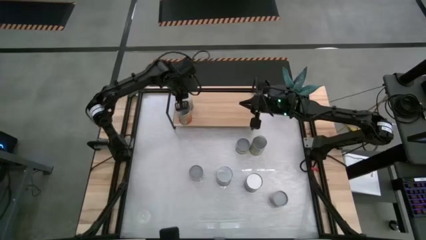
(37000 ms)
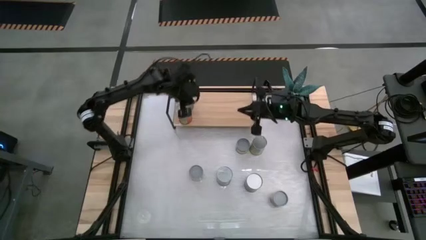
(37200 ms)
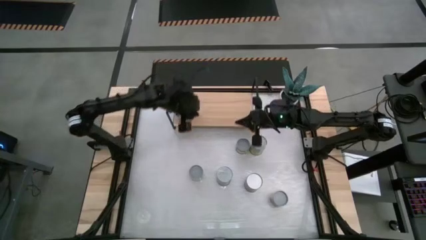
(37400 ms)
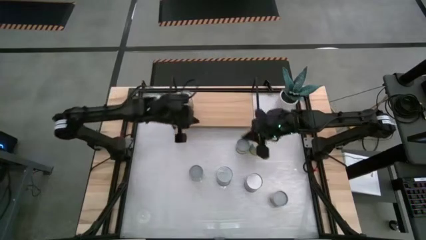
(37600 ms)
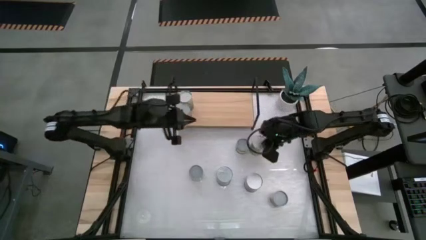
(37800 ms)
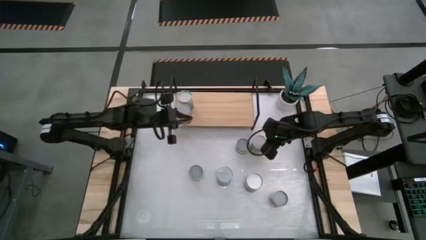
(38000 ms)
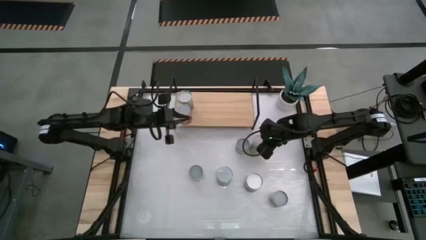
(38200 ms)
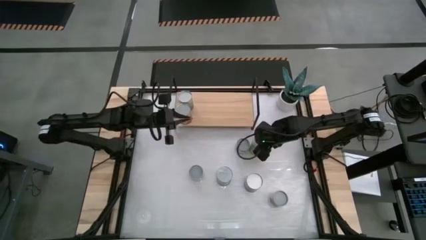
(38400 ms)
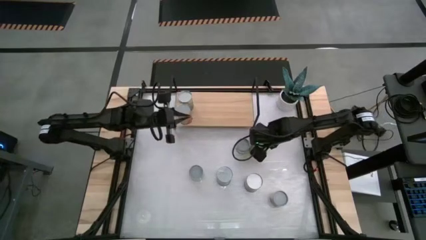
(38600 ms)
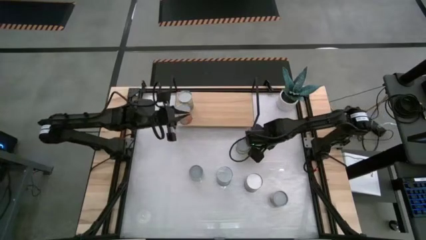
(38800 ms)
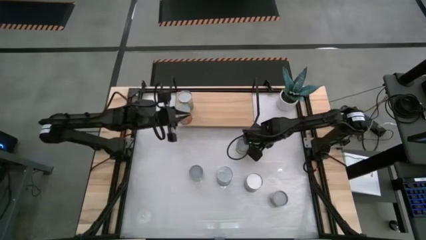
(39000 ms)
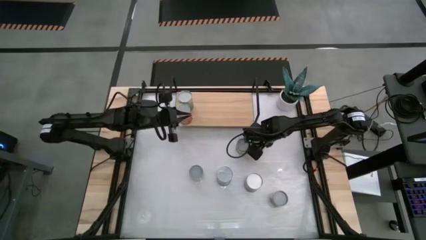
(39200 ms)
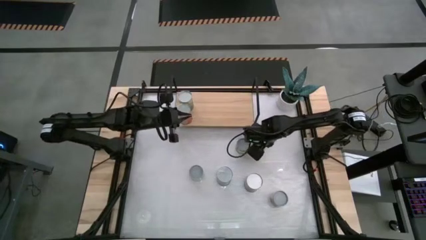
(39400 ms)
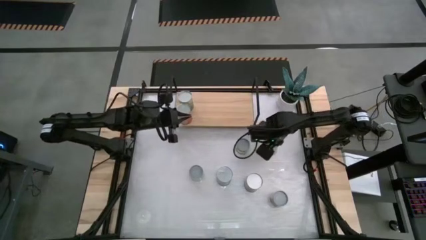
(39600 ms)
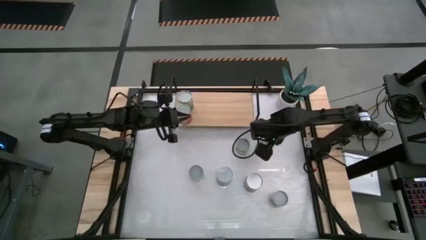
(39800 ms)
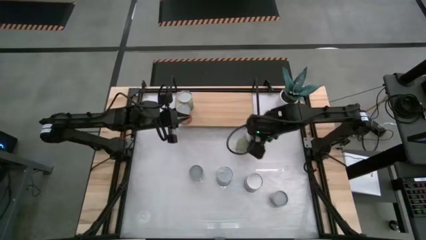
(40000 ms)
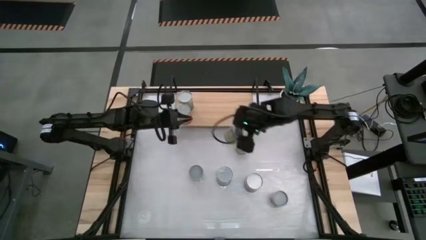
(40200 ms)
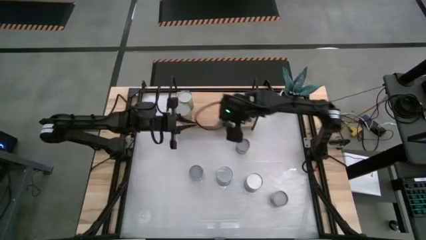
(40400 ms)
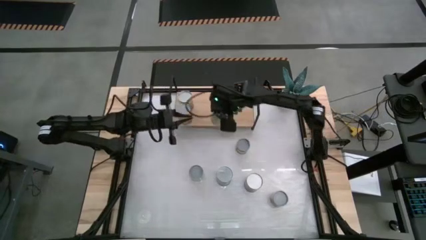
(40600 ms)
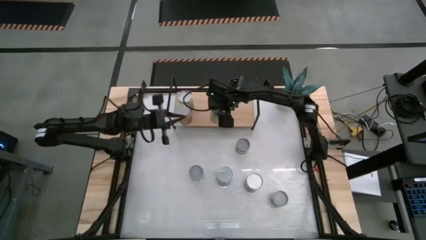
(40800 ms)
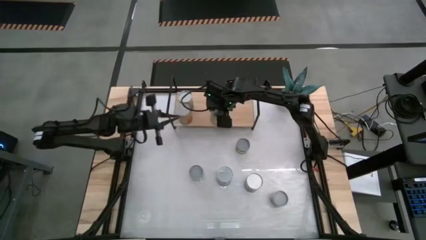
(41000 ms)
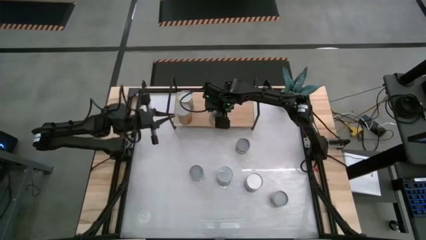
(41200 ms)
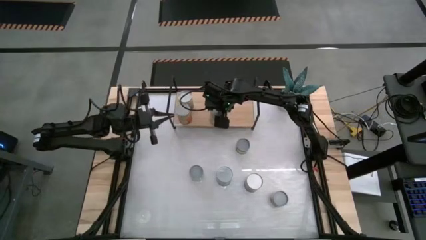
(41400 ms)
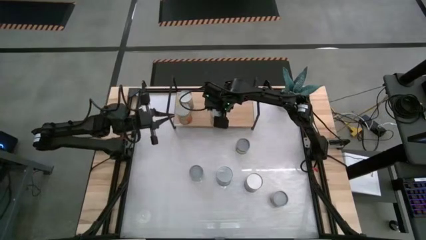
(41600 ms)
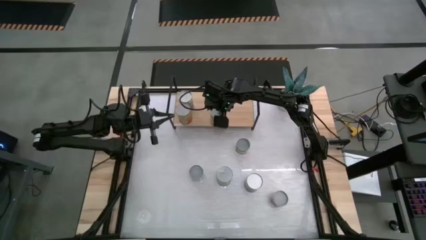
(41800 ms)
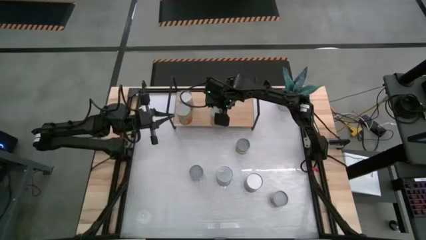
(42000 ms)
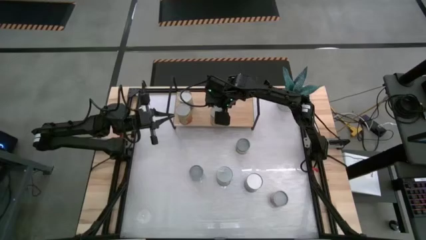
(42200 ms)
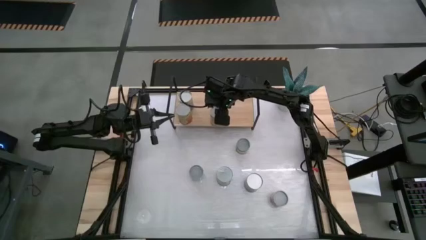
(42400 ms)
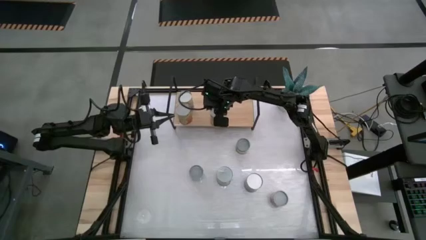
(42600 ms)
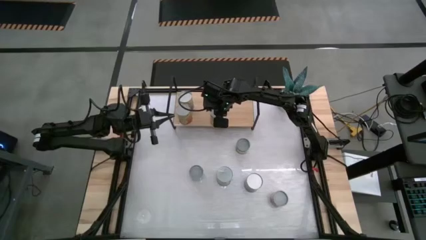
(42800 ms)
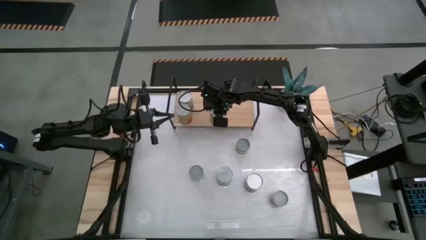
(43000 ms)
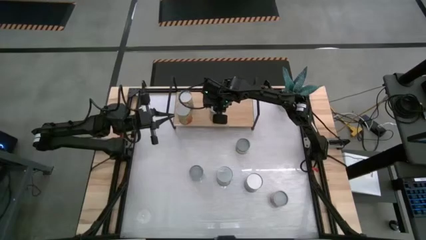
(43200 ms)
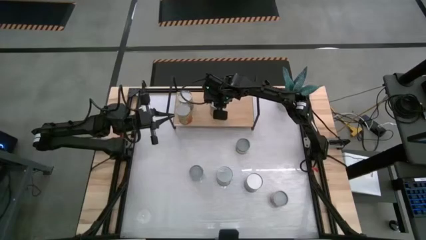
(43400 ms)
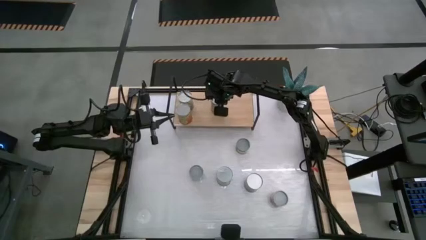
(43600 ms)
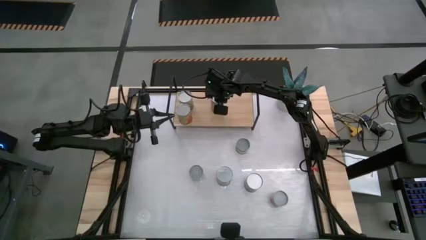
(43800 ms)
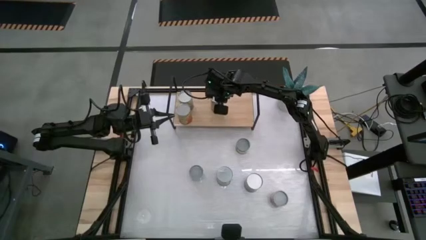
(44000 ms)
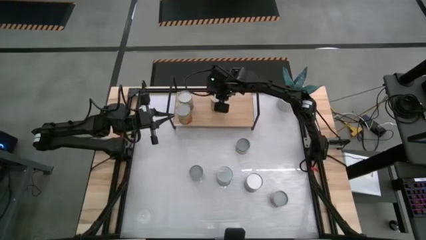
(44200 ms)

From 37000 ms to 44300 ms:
Task: Pick and place cans onto a shelf
Put the canned carrots on the shelf

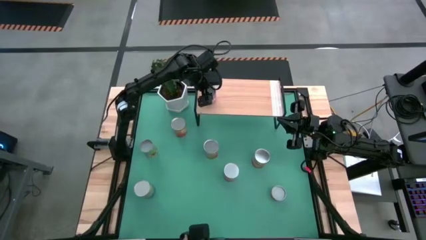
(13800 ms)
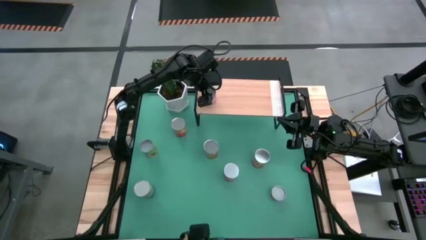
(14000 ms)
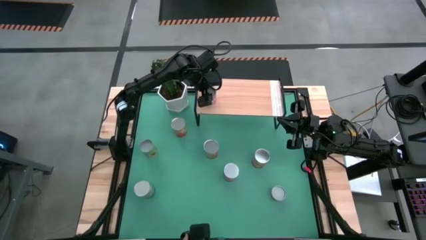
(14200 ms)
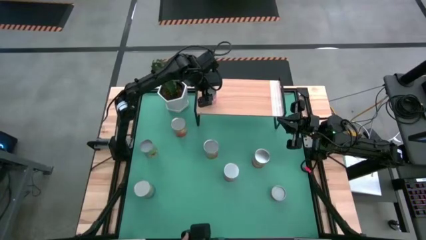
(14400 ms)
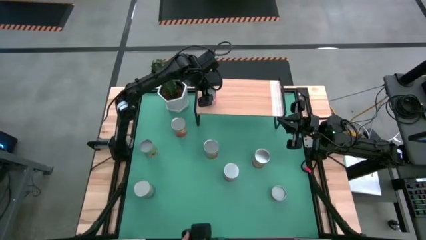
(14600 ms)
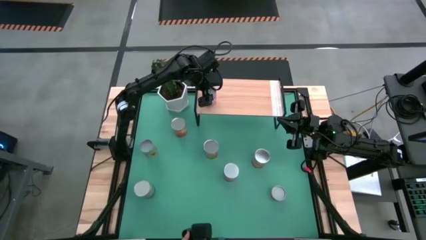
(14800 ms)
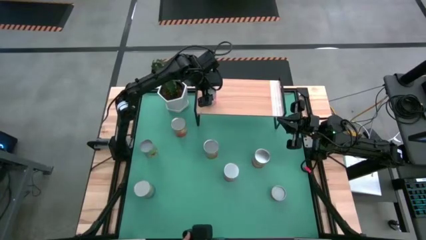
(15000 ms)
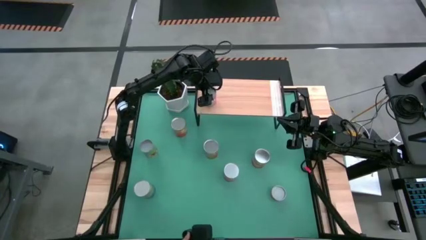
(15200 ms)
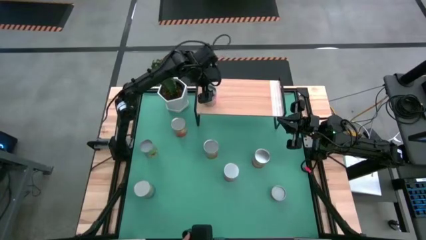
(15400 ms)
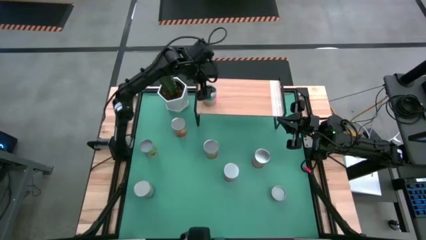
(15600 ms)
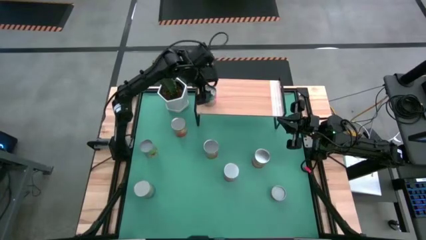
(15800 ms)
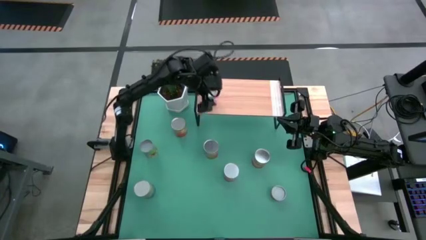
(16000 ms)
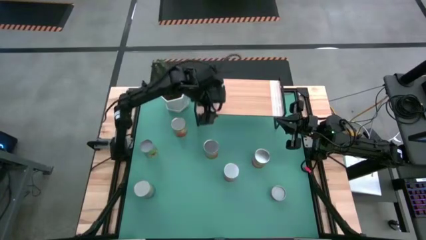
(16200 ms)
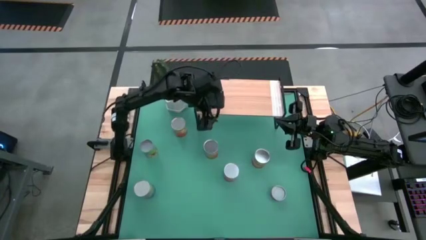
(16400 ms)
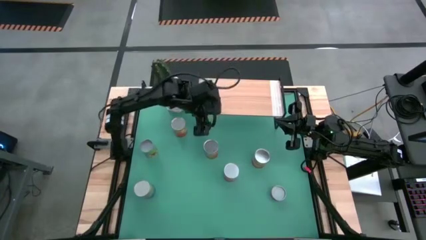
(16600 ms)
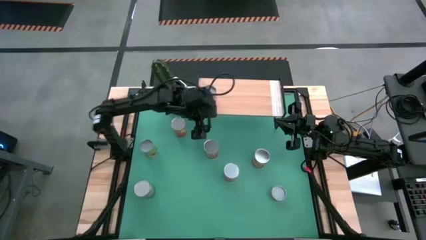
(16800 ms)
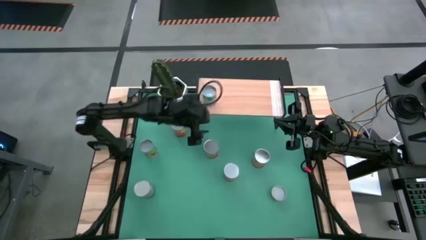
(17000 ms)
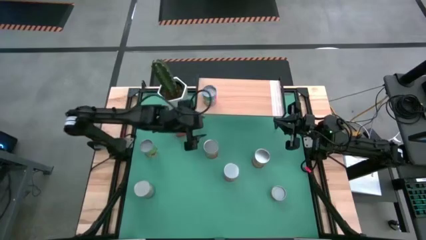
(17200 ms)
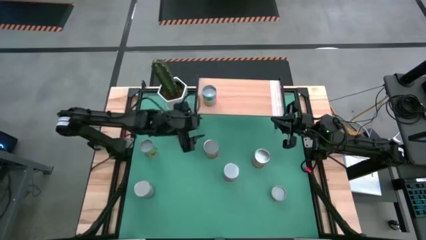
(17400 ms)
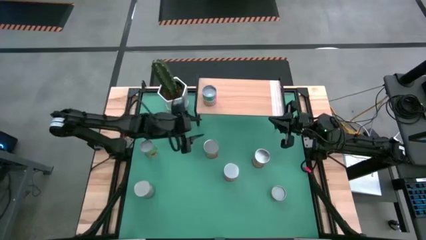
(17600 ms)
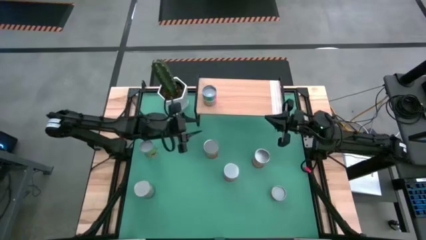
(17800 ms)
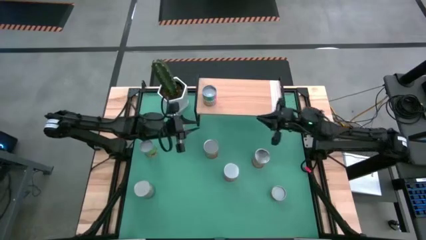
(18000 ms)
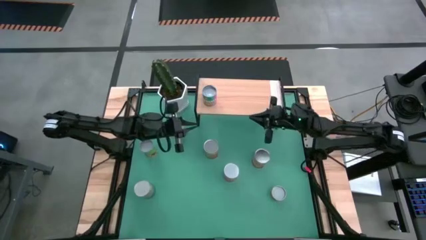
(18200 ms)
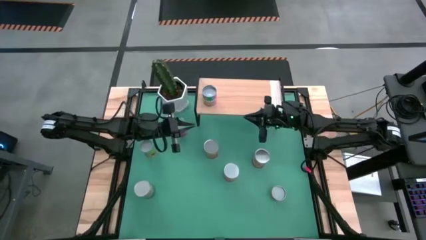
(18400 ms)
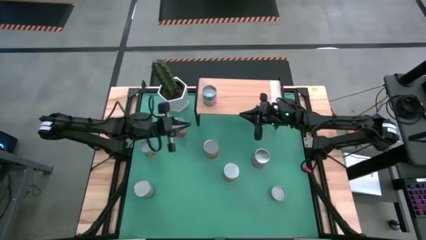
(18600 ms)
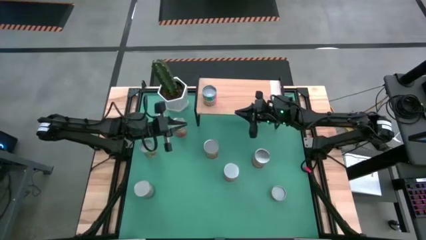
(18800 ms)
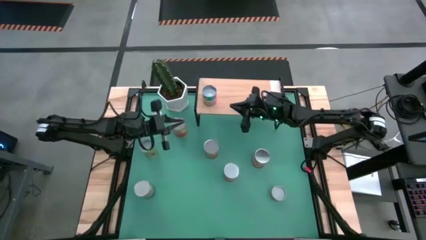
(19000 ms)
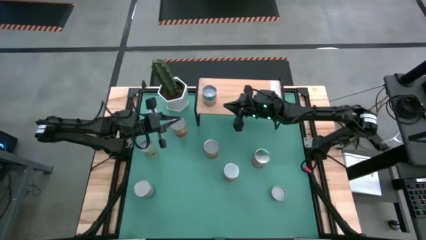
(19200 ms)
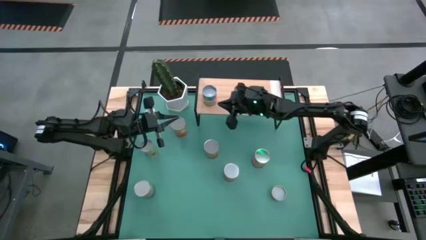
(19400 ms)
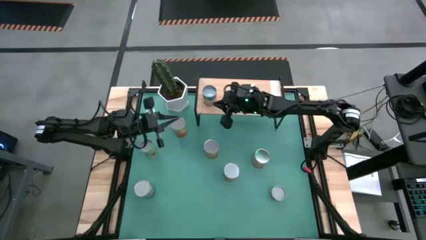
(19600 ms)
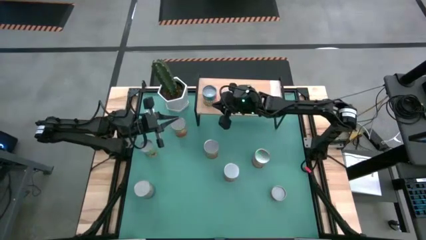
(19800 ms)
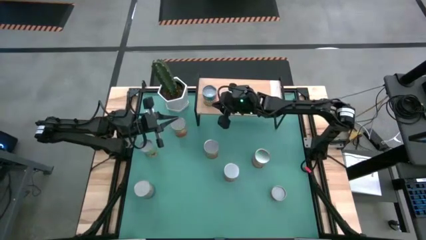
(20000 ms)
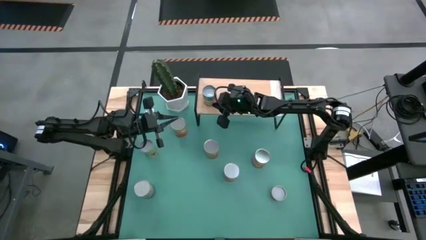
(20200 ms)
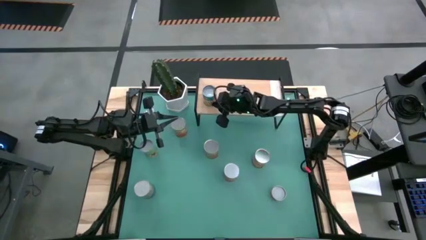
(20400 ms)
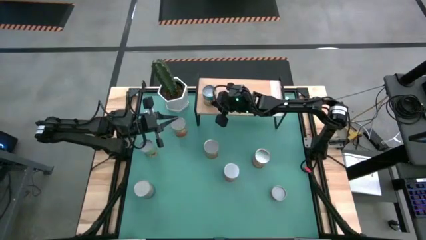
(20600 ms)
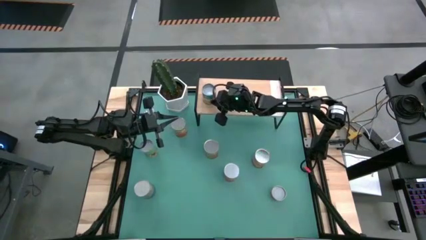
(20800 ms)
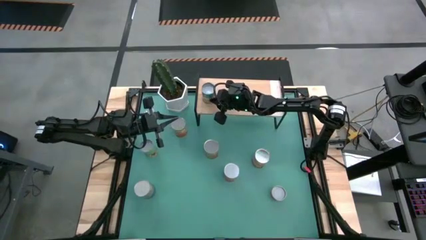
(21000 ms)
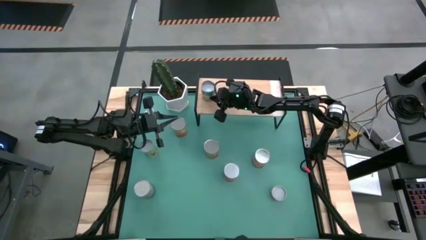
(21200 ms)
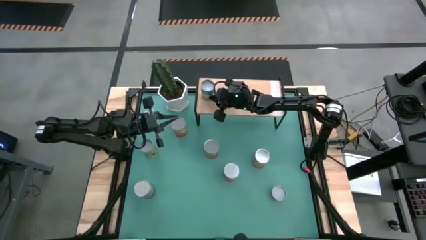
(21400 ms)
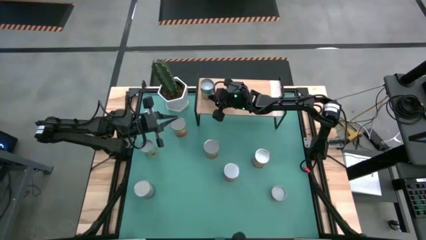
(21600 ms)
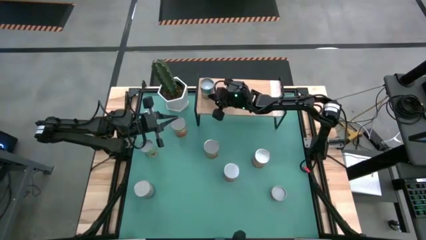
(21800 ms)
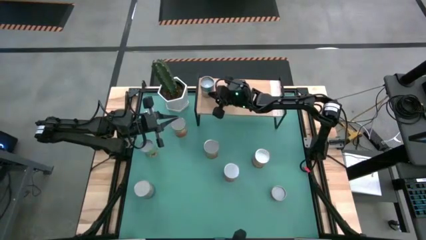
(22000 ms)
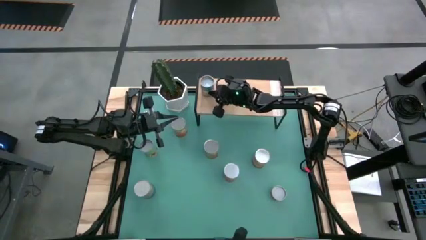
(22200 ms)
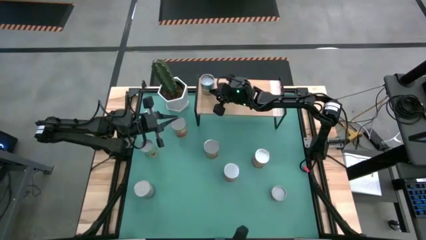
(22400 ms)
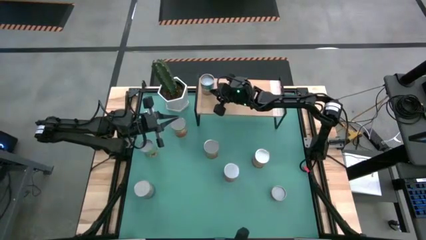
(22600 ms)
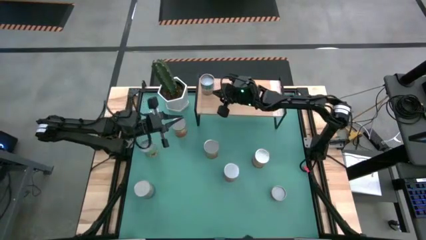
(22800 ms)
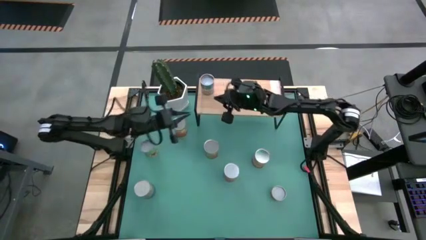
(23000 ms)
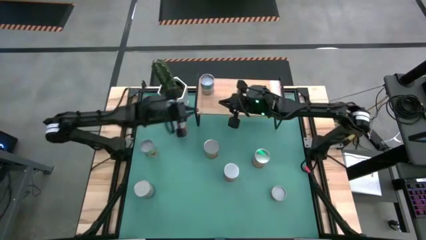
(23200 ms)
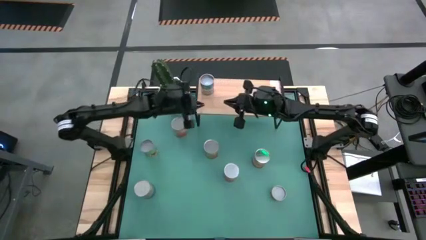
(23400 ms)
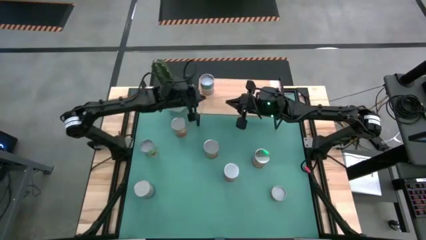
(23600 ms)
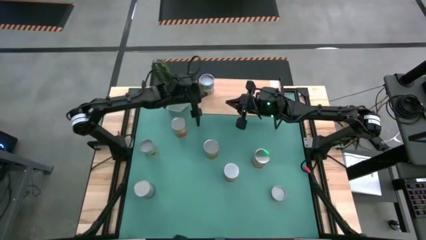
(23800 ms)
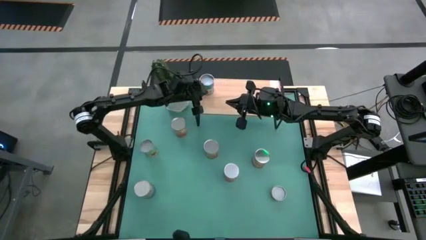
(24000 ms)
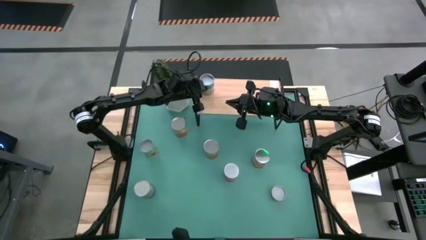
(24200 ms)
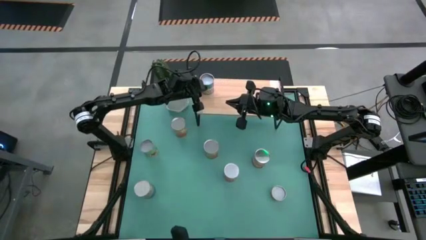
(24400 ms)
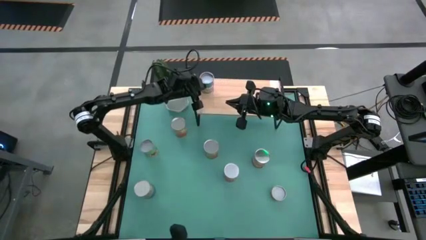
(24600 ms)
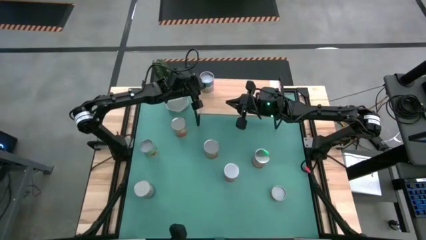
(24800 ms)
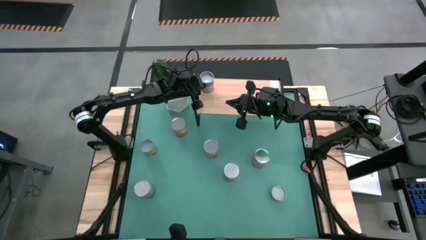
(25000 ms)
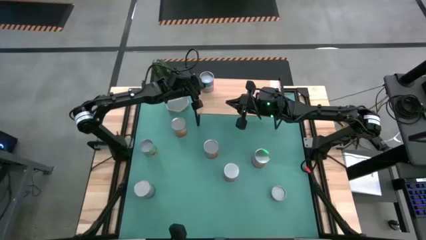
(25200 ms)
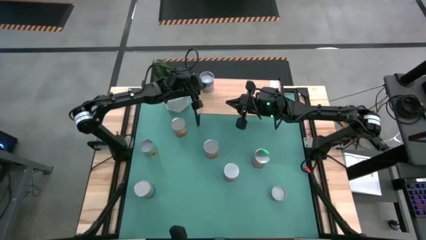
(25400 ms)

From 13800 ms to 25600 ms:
Task: Pick and place cans onto a shelf
Put the canned chicken soup on the shelf
